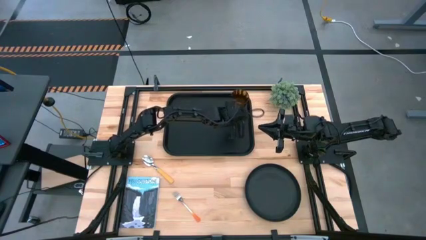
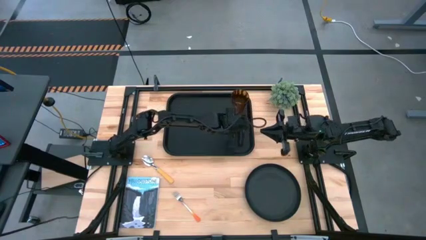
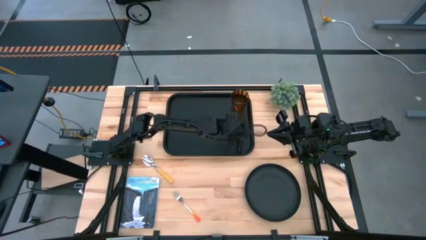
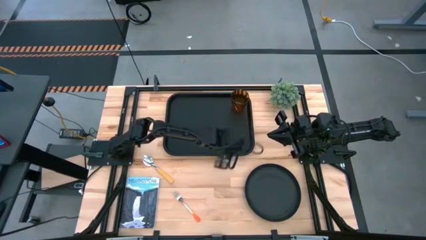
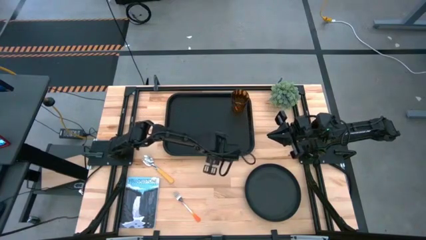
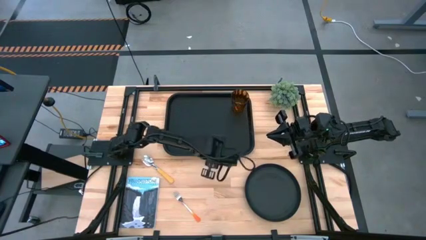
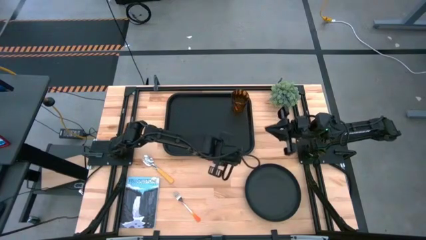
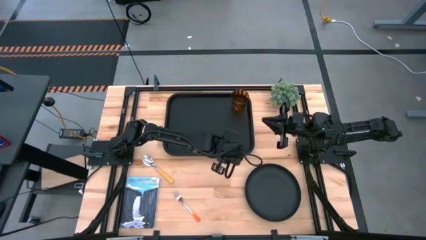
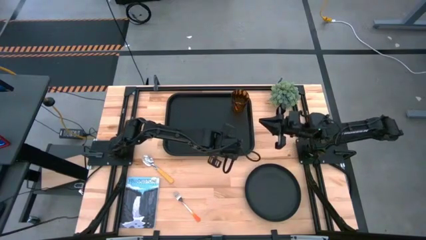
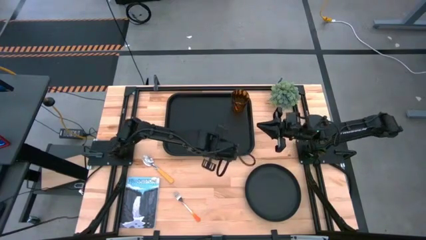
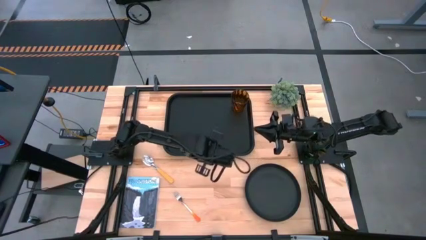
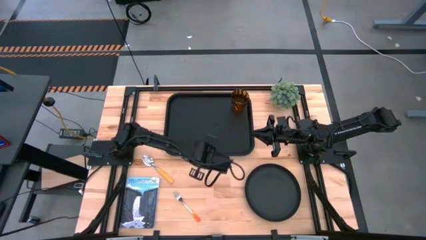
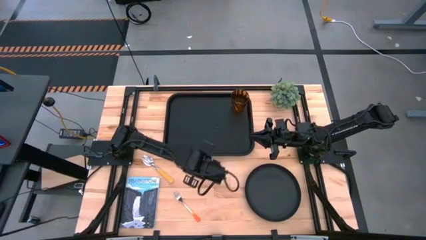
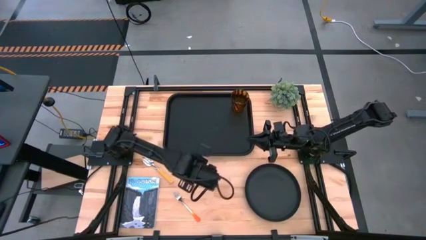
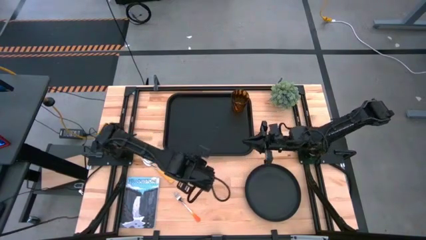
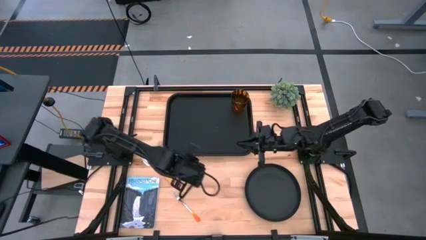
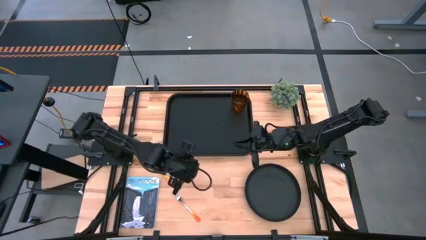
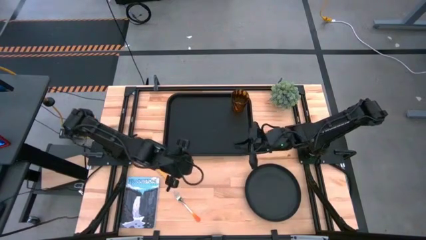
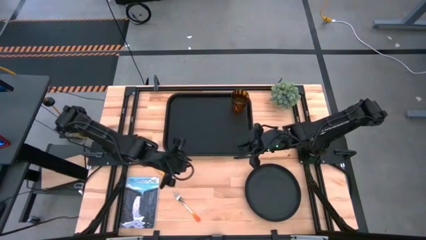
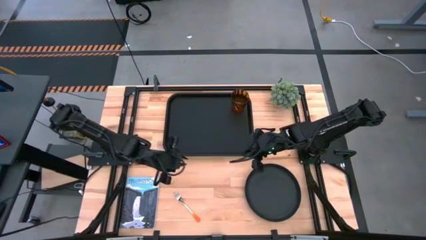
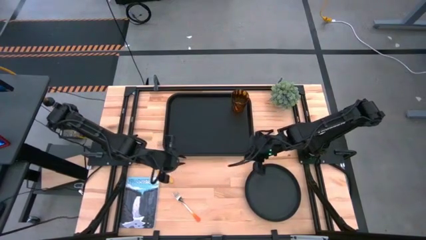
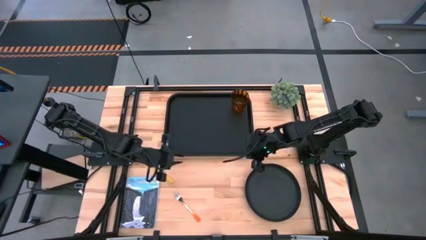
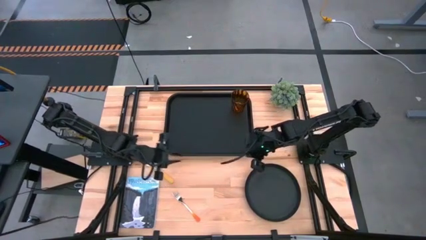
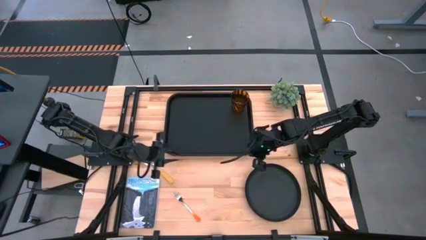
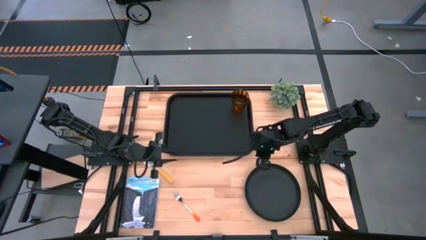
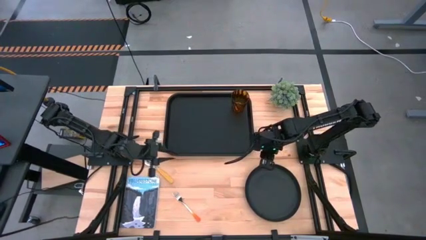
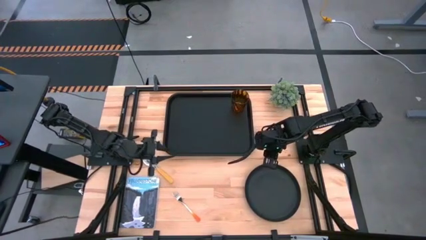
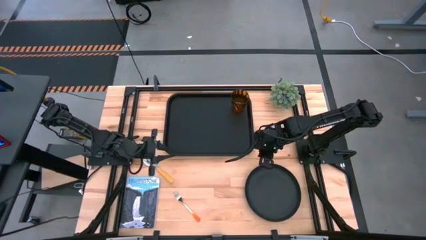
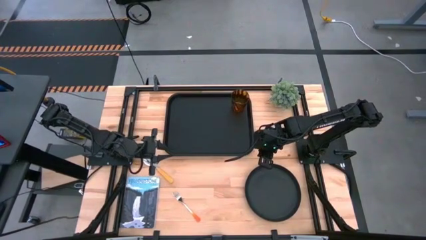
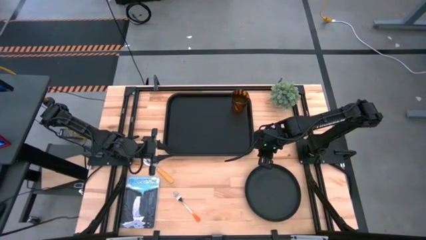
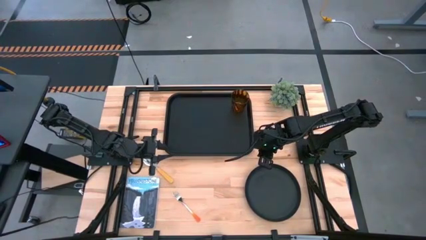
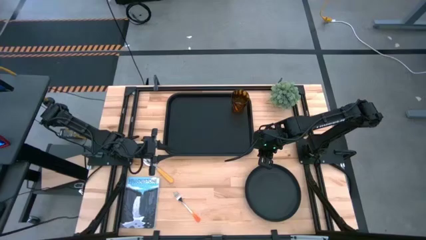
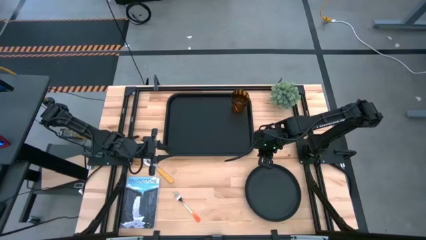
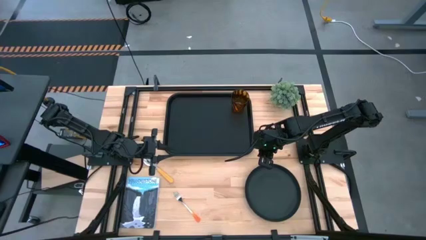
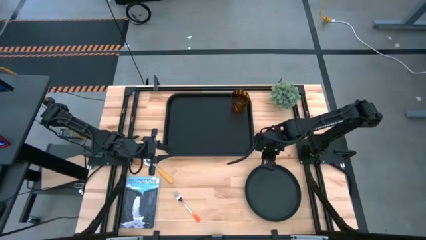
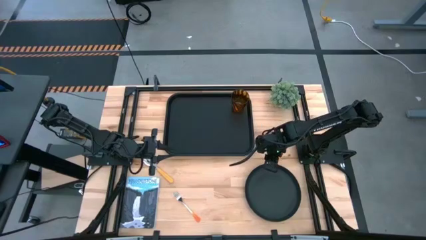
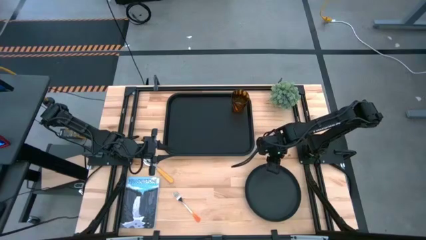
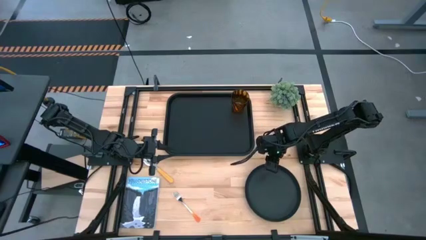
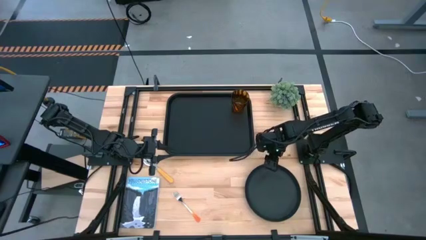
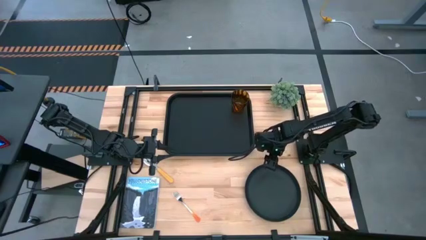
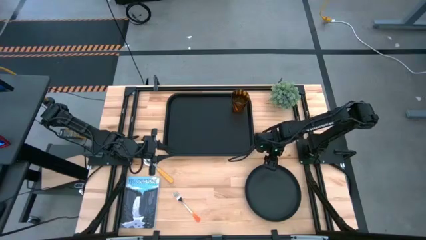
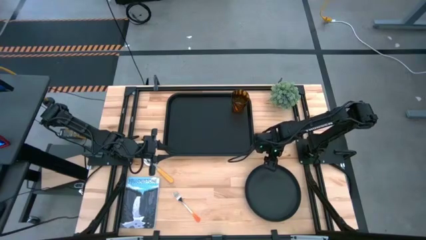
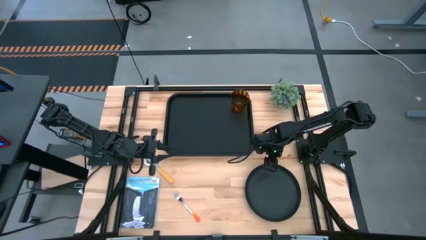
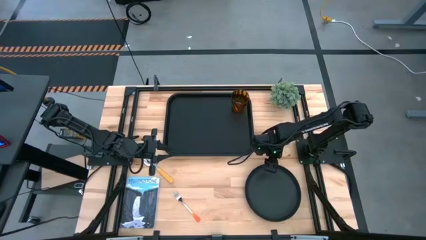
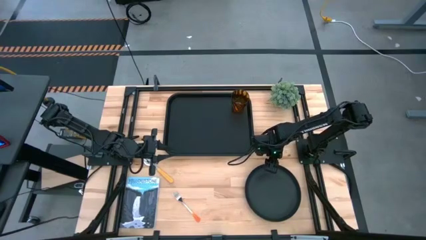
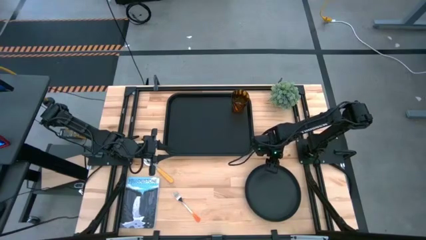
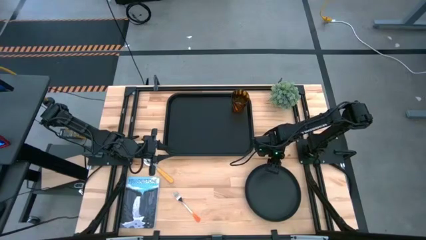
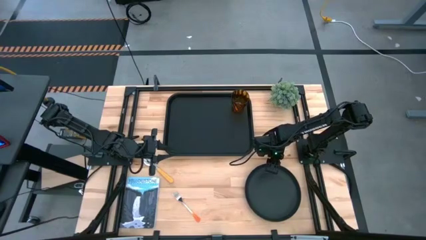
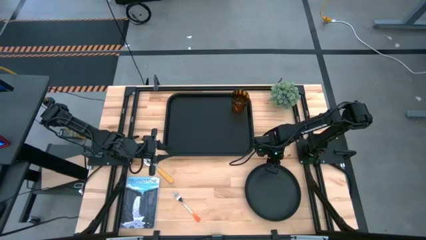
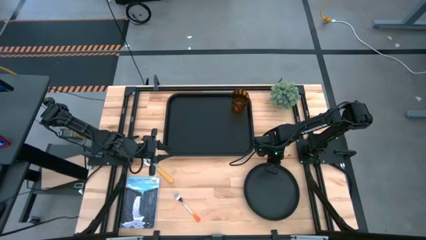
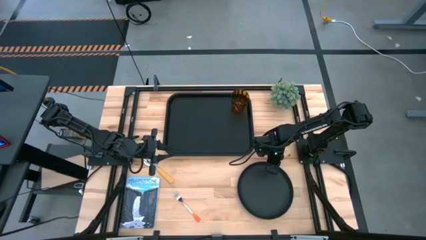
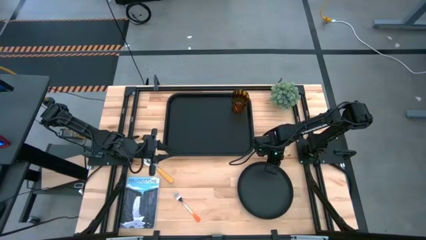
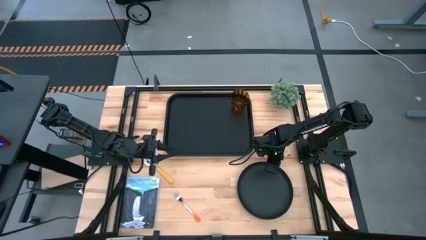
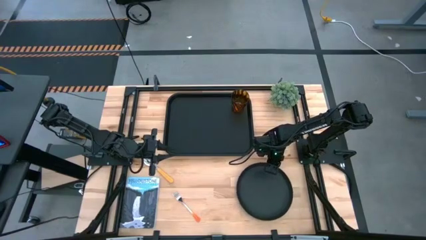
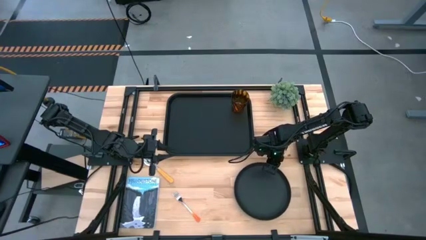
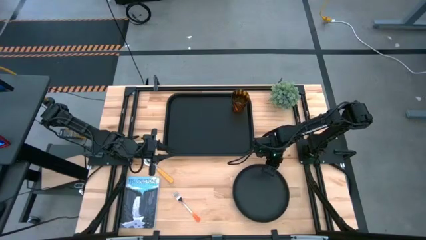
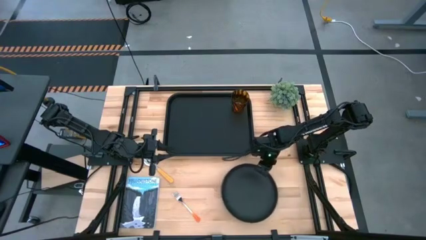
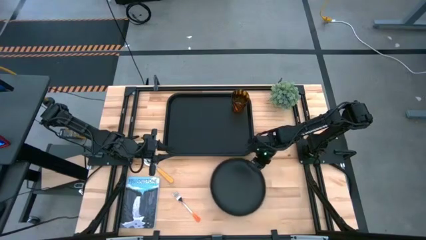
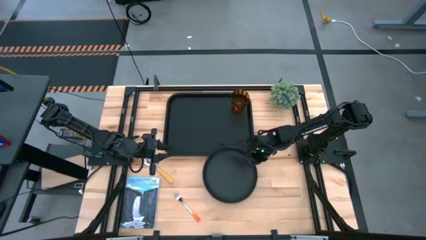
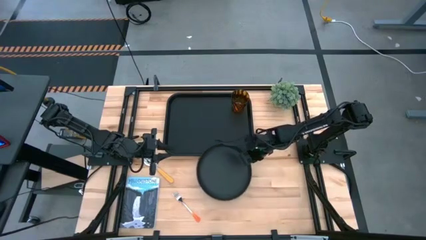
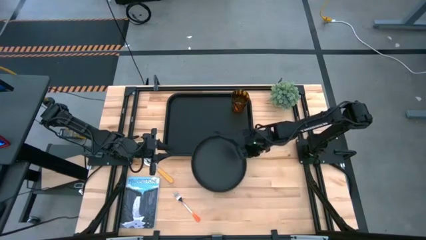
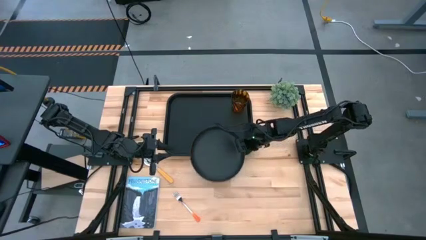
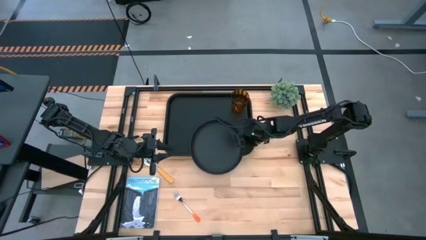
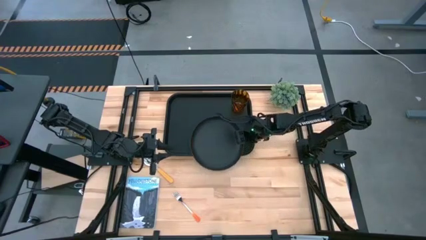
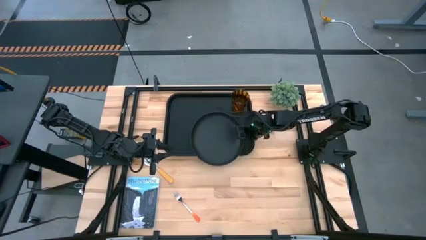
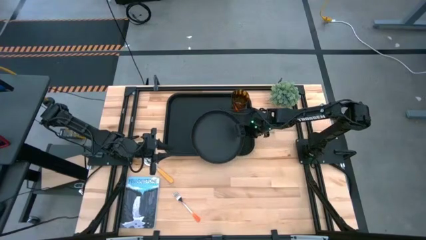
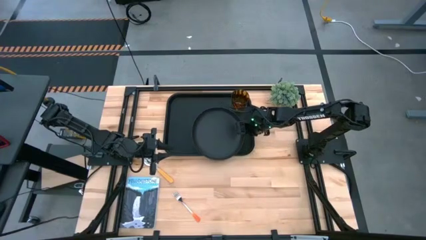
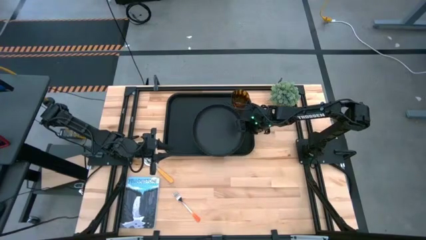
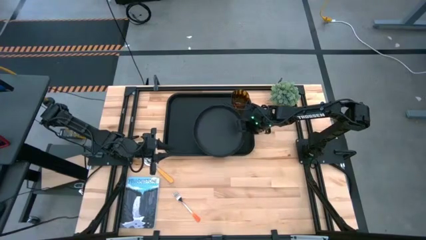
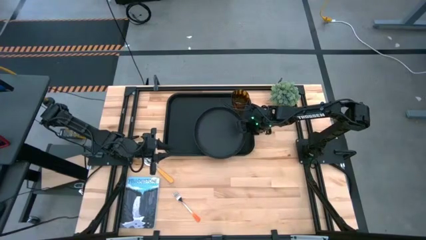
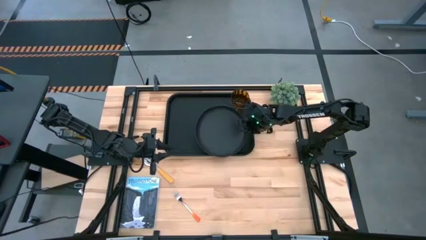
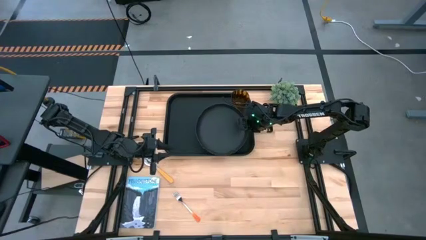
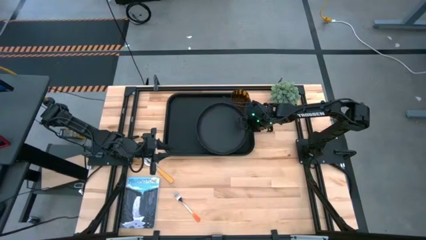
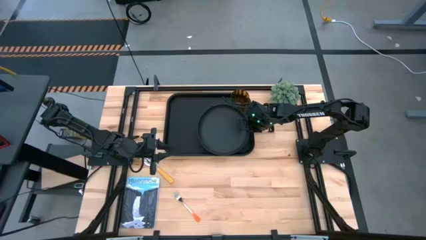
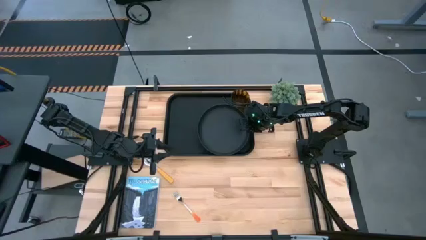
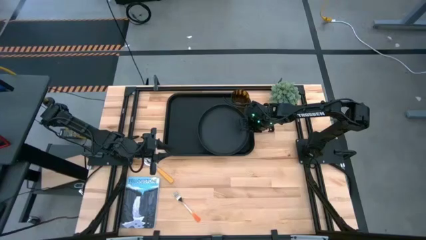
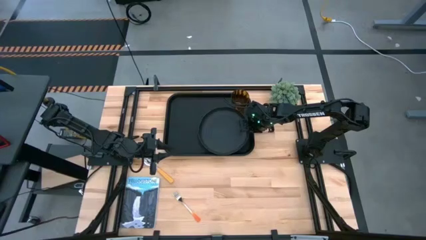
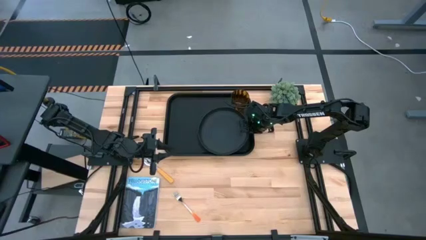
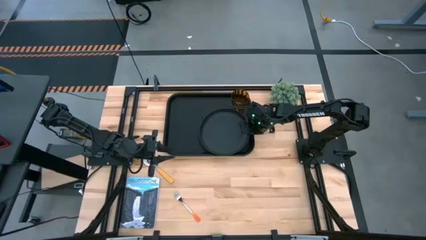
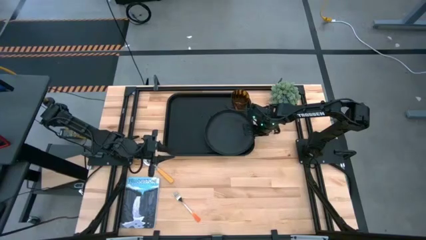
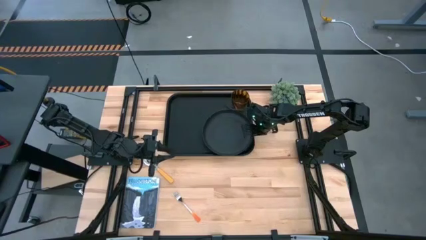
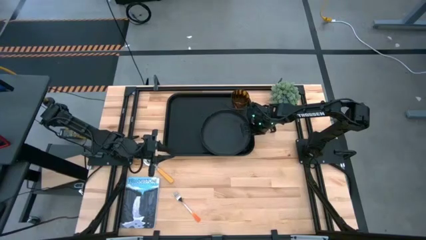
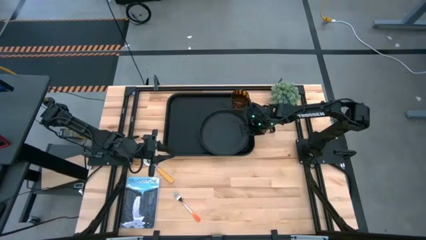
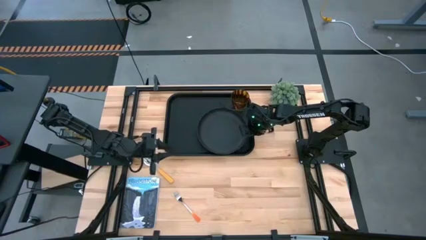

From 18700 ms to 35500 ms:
Task: Pick and place plate/cup/fork/spoon on tray
Put the black plate on the black tray at the bottom of the brown glass
